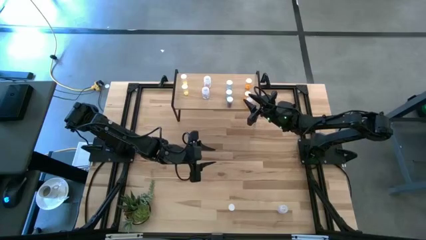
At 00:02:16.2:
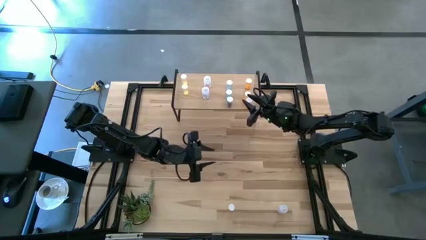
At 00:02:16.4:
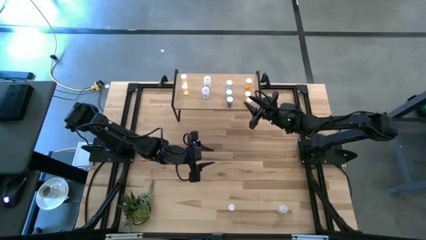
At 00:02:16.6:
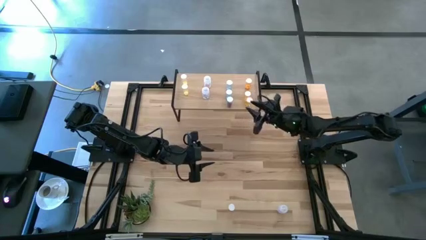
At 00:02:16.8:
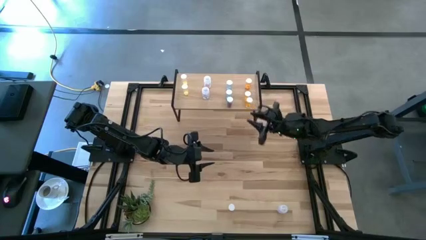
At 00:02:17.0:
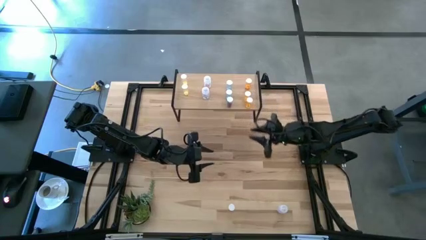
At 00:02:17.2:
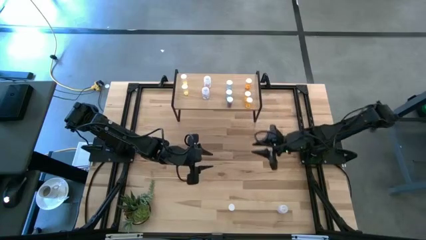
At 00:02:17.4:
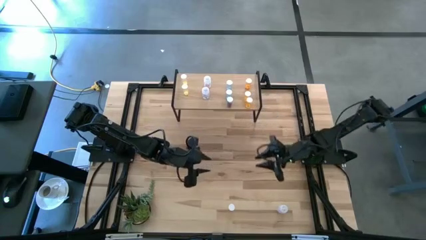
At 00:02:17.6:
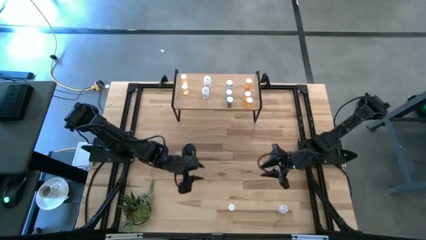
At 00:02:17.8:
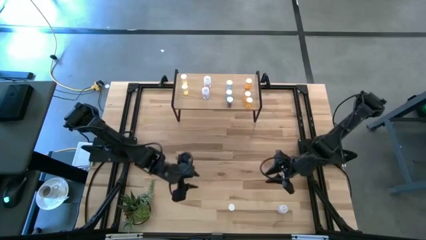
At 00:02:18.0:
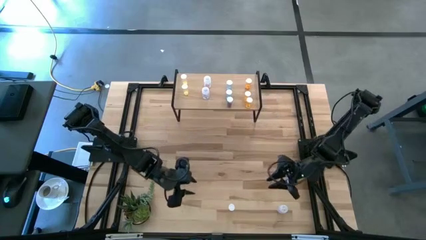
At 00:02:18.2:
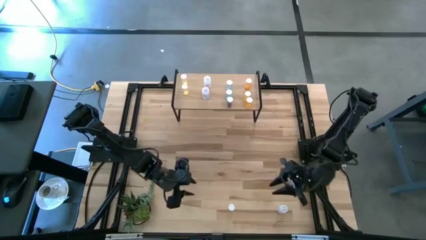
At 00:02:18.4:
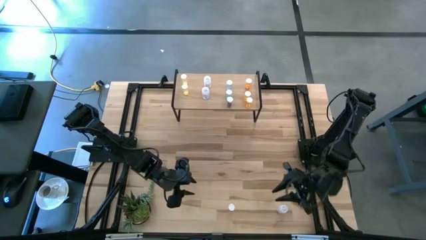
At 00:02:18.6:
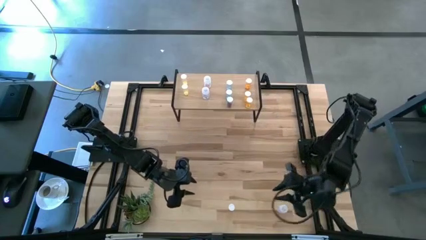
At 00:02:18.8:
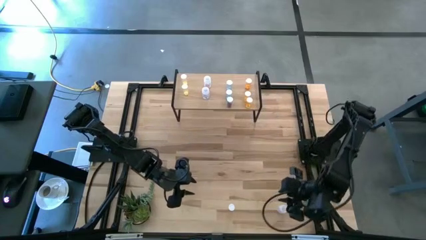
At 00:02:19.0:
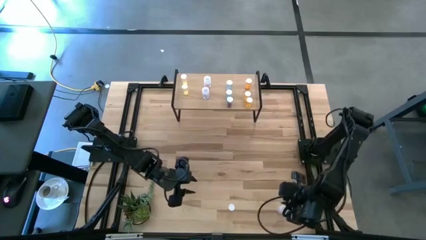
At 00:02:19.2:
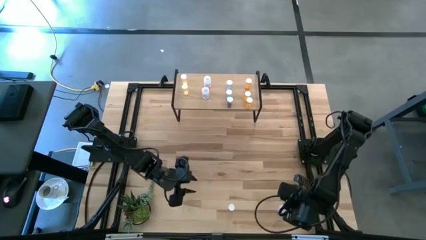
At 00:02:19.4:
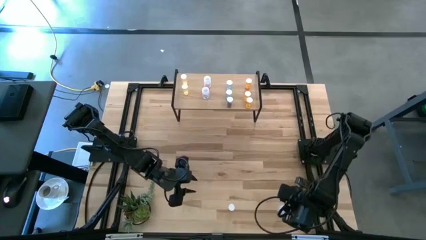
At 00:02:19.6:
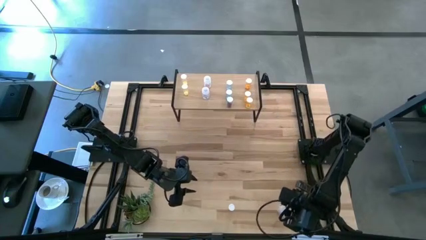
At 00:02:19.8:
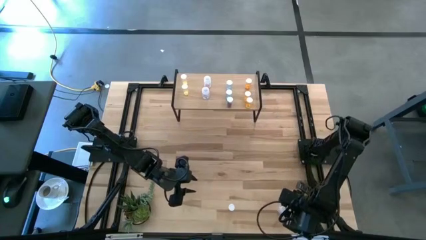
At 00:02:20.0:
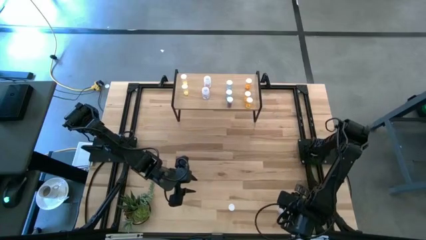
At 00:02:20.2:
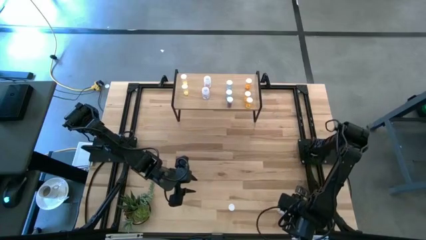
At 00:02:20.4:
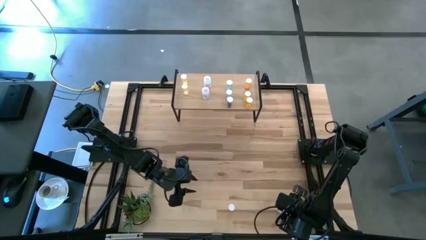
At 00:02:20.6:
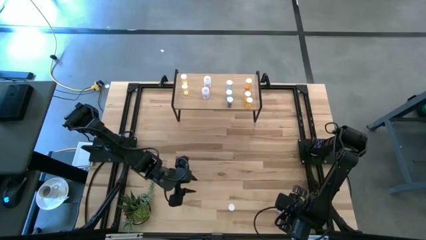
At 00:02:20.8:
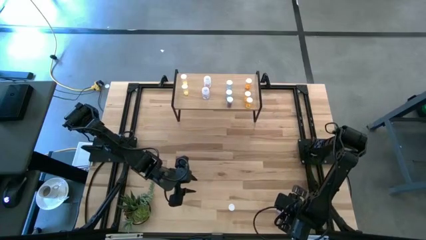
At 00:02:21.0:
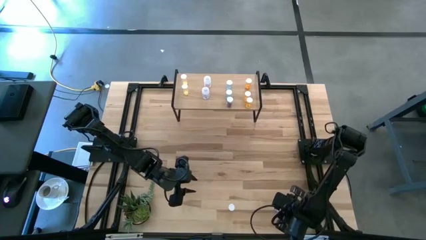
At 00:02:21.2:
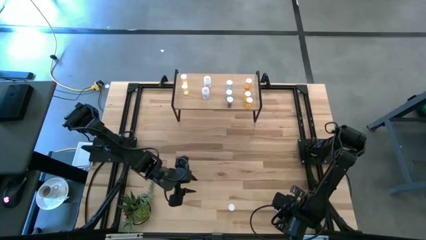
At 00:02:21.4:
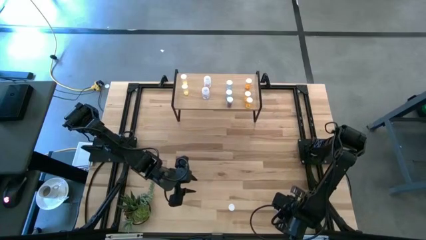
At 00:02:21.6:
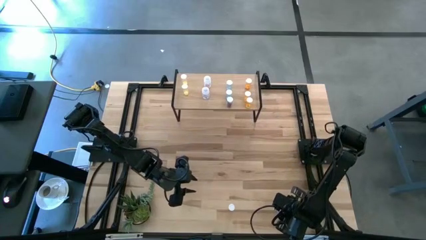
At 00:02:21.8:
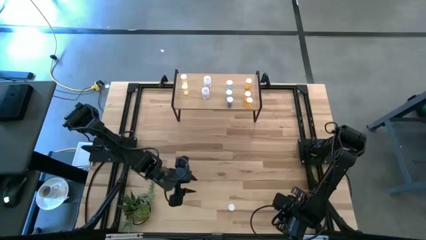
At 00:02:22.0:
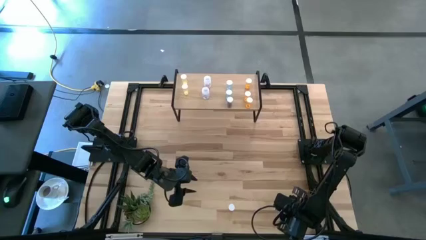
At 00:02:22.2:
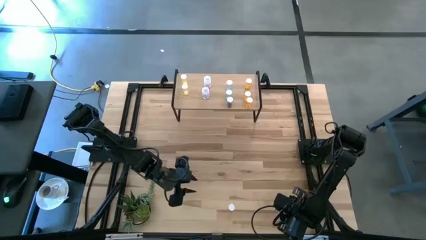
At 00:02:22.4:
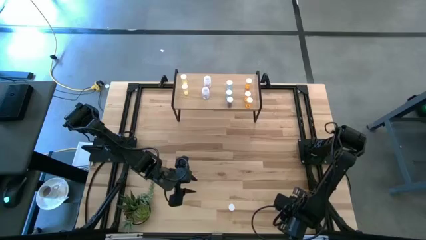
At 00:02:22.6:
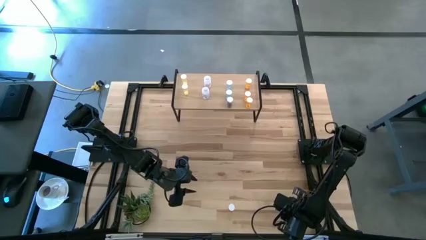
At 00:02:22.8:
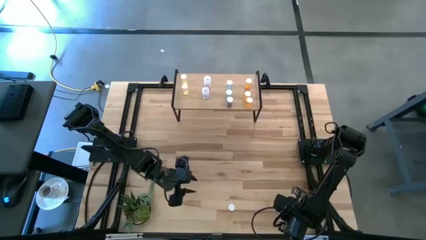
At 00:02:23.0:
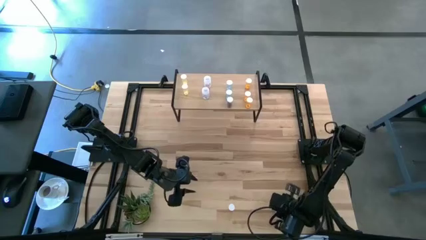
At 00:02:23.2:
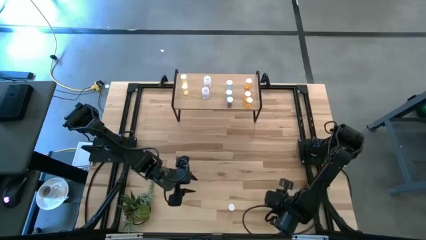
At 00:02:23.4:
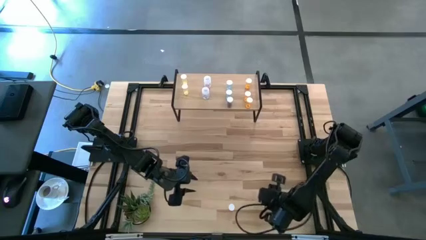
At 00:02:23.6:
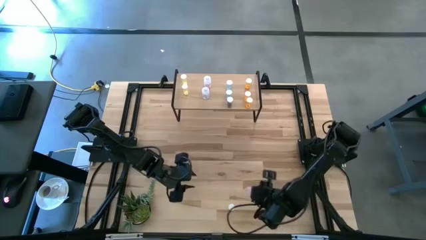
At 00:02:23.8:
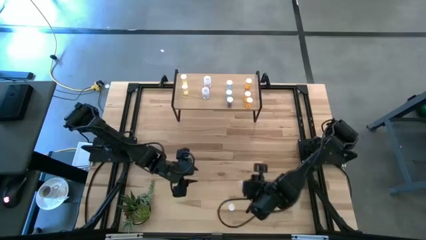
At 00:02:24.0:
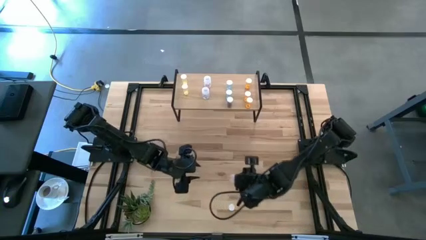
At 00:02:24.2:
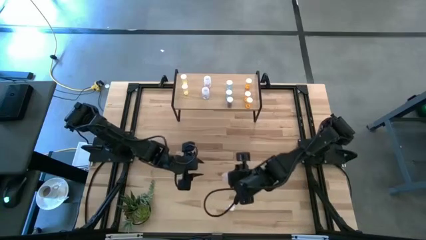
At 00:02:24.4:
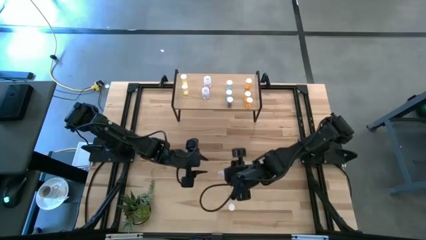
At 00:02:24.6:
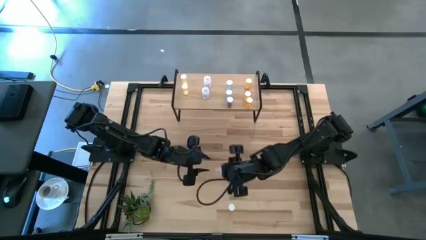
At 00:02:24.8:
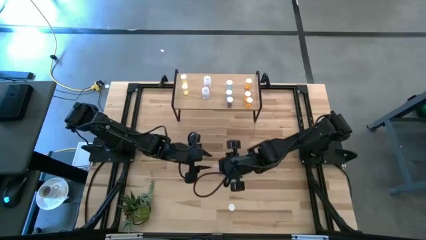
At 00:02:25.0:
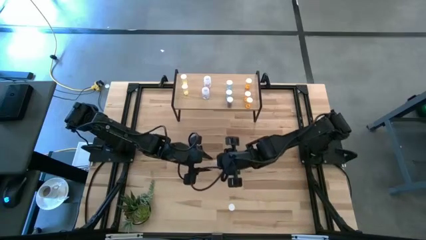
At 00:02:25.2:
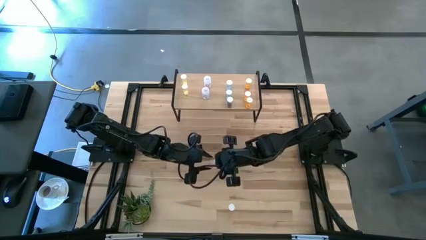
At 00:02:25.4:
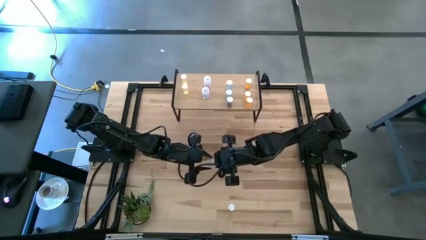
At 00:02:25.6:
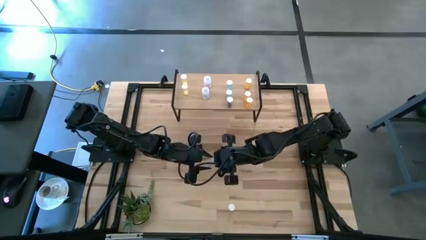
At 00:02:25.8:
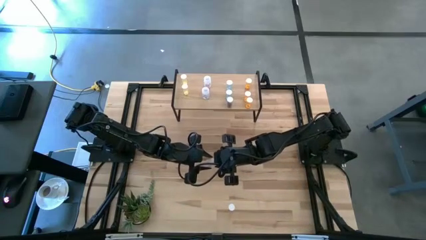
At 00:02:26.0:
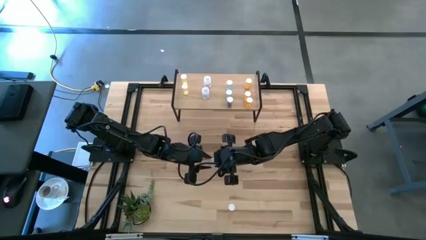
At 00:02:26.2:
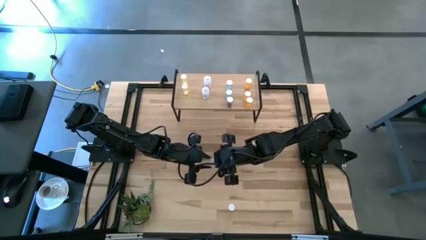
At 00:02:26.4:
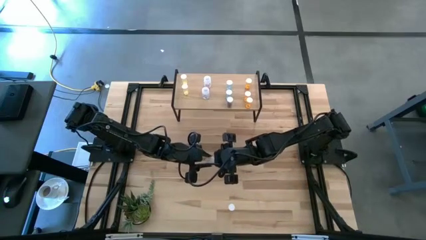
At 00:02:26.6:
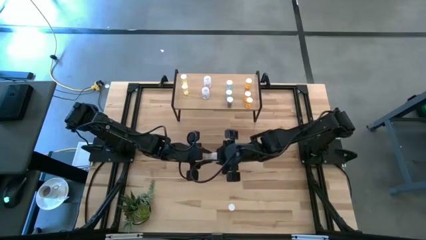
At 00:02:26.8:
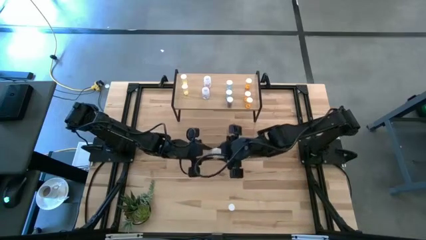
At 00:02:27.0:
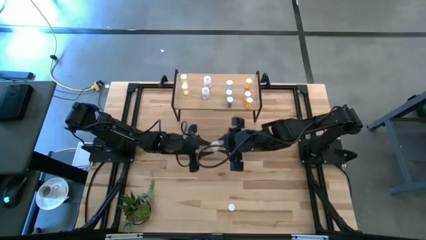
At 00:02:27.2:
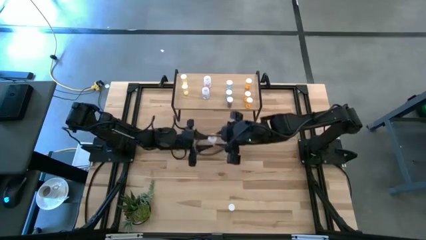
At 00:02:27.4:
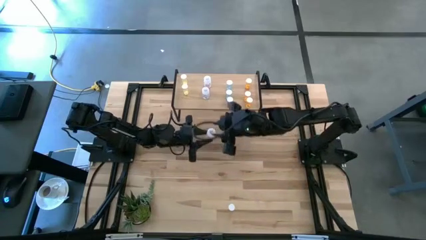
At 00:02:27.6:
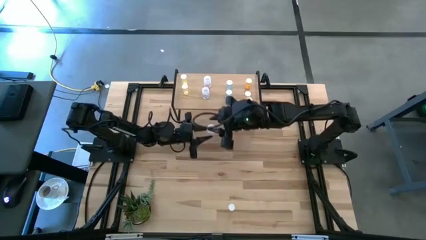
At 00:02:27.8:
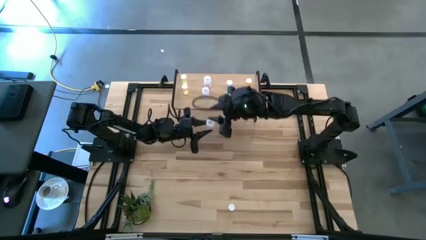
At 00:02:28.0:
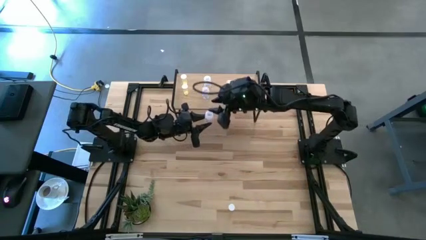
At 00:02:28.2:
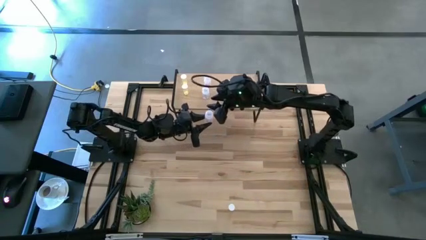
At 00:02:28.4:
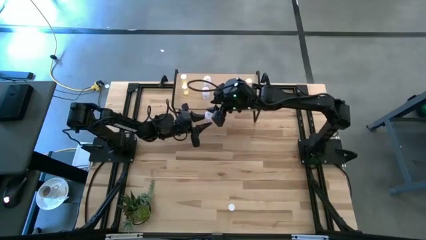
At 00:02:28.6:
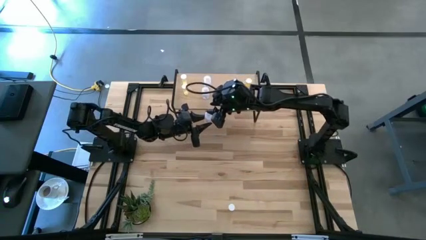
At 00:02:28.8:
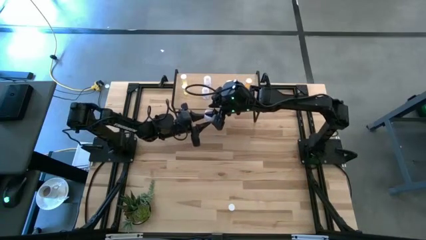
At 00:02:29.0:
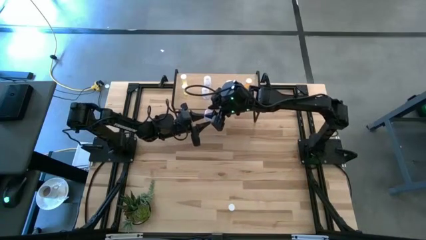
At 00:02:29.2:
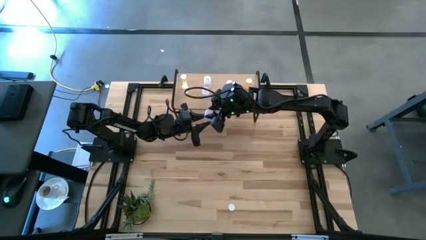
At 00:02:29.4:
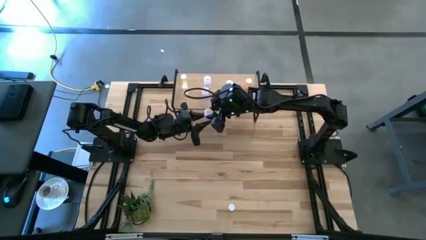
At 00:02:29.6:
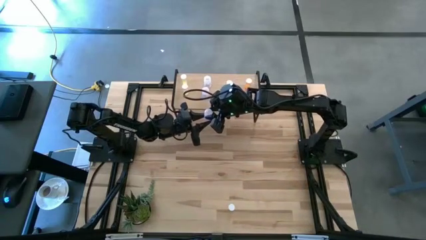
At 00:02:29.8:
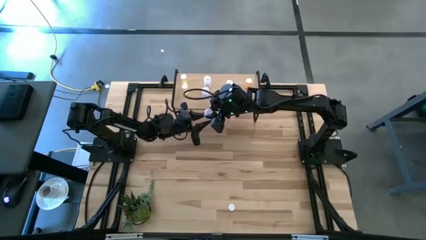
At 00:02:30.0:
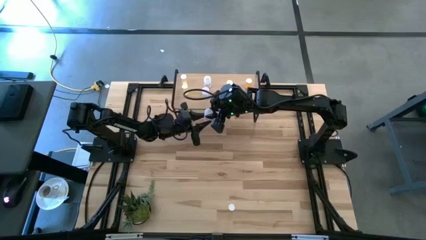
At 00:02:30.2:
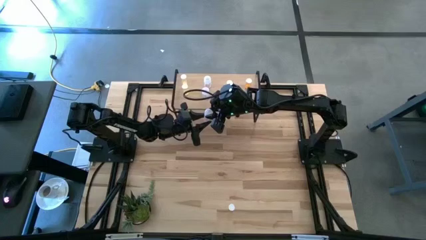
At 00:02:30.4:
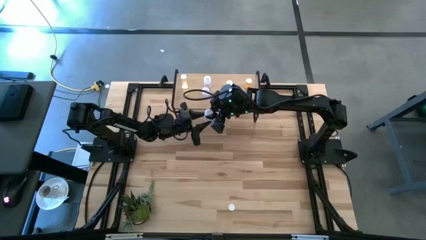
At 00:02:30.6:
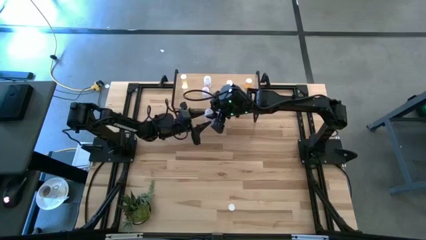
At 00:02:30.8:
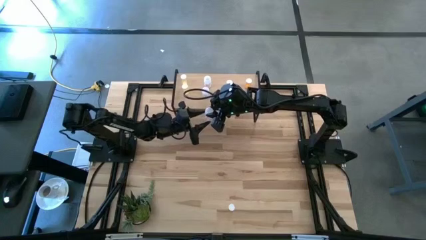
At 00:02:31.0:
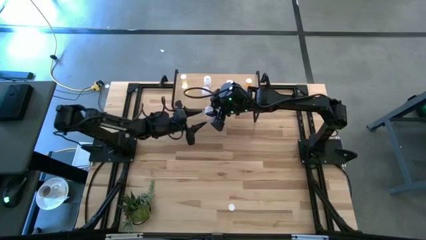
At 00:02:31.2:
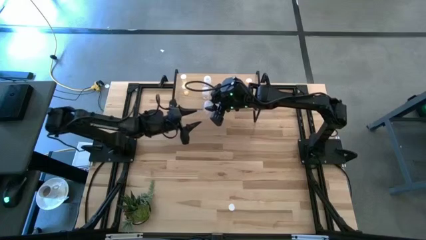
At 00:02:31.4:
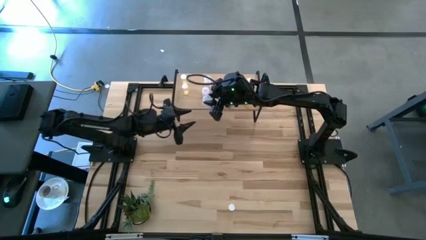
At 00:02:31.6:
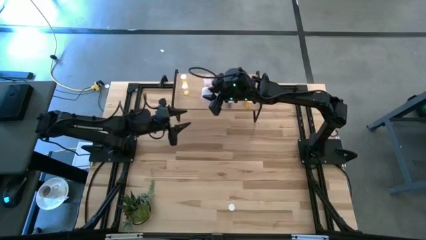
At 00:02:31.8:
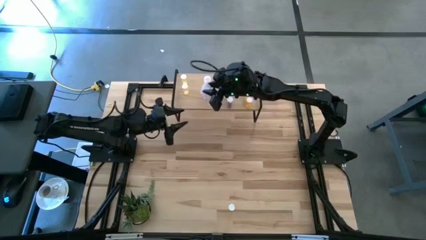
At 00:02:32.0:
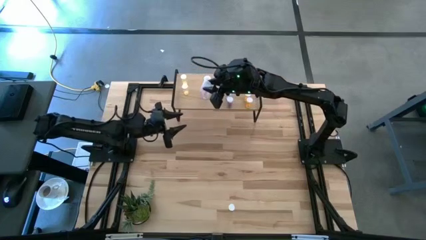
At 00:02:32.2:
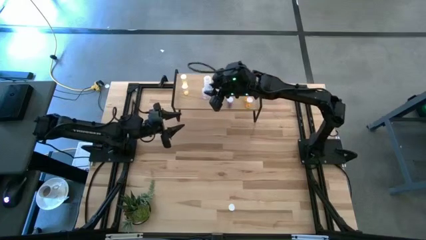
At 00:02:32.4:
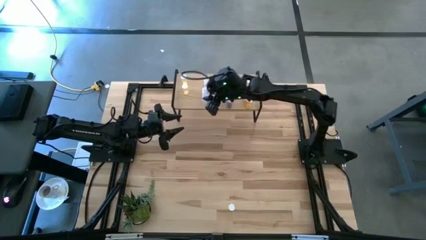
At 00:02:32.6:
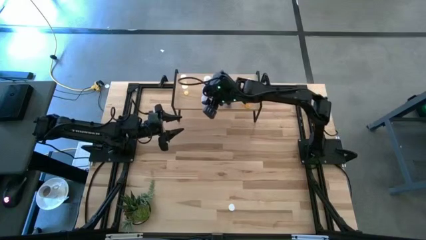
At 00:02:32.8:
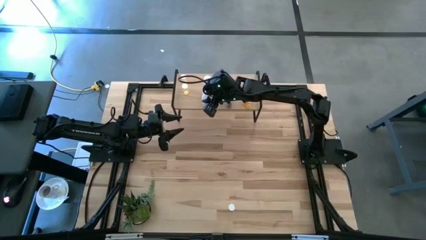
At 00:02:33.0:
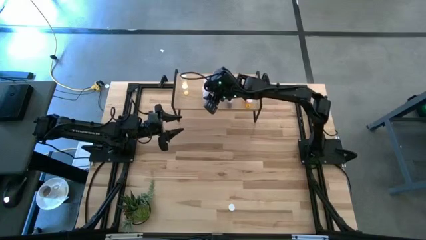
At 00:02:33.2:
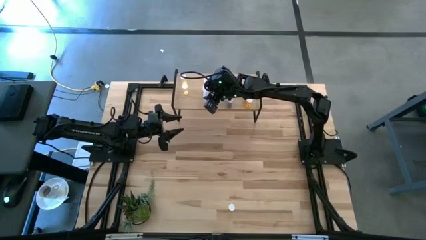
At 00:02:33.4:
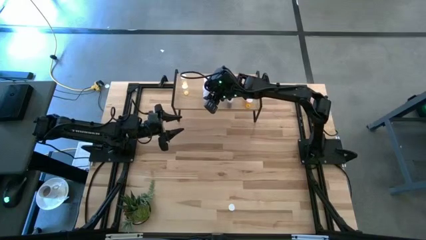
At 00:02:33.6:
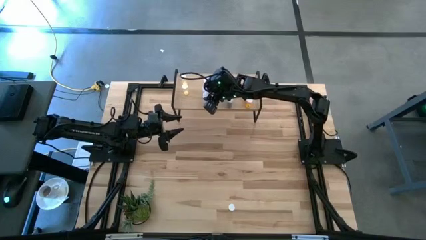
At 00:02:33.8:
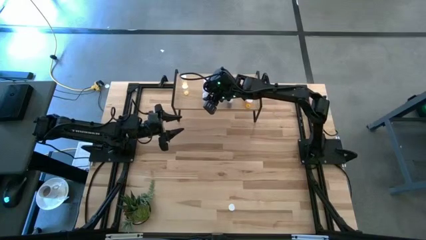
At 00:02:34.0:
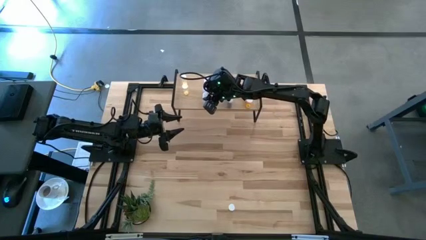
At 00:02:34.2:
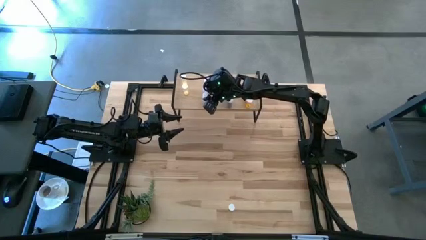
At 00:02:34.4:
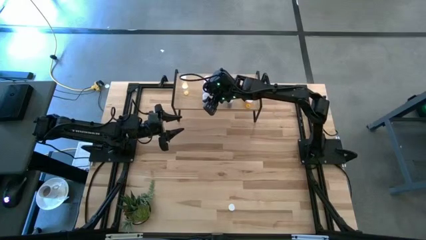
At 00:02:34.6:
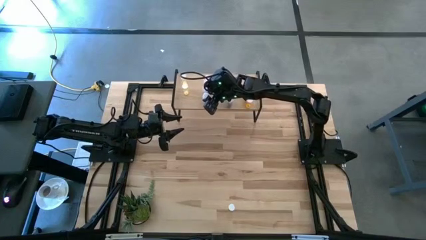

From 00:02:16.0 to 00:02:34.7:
Task: Pick and place medicine bottles onto shelf by color
Put the transparent pill bottle on the shelf aligned with the transparent pill bottles
